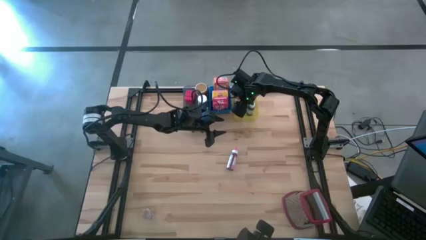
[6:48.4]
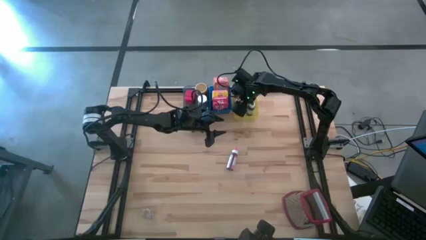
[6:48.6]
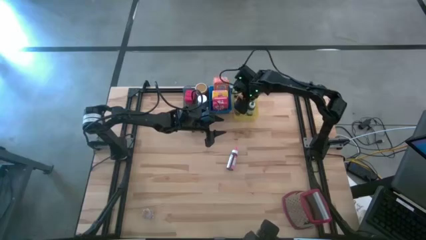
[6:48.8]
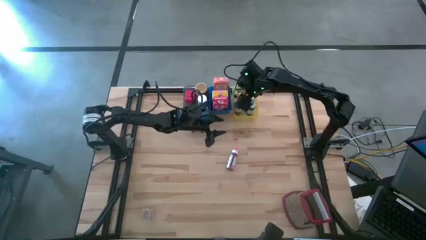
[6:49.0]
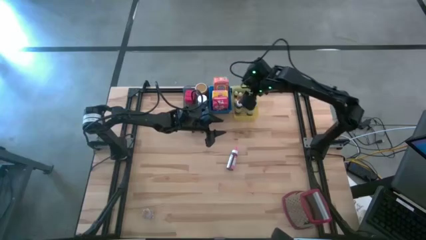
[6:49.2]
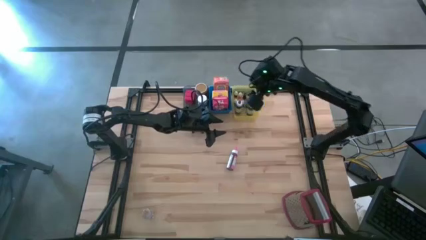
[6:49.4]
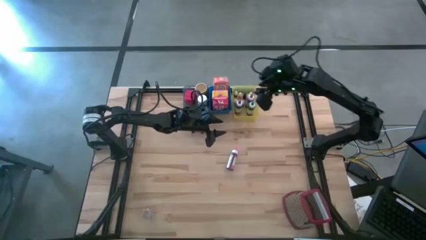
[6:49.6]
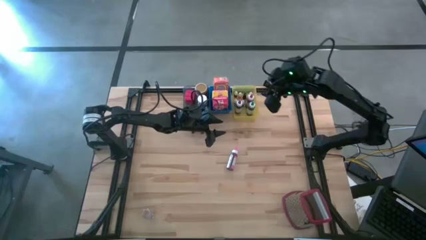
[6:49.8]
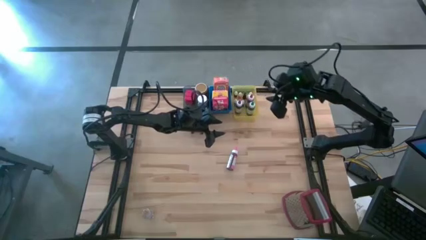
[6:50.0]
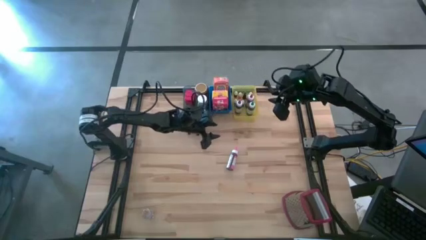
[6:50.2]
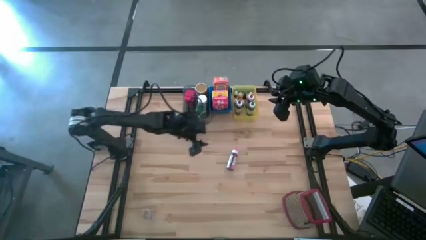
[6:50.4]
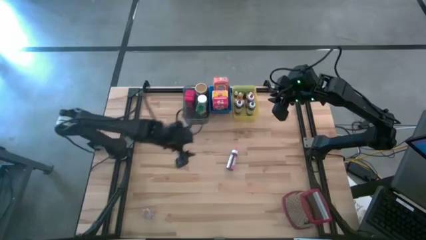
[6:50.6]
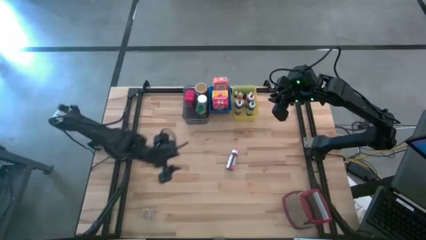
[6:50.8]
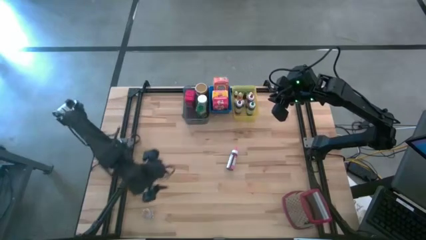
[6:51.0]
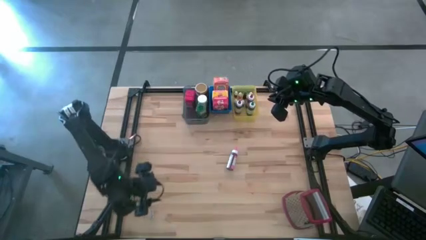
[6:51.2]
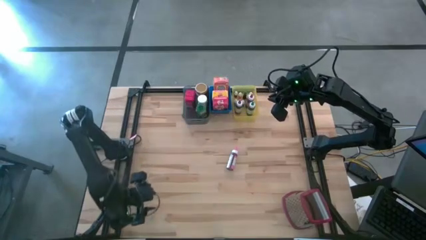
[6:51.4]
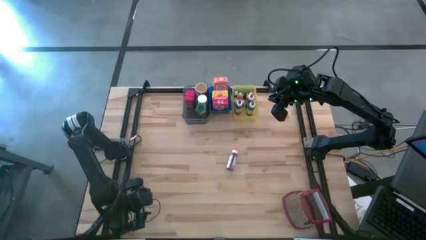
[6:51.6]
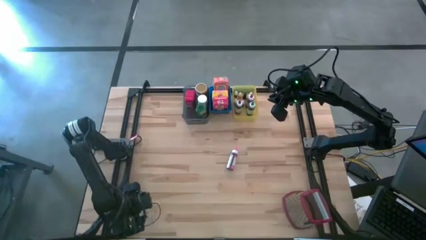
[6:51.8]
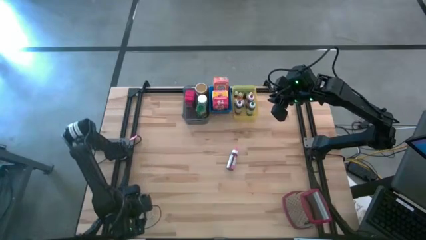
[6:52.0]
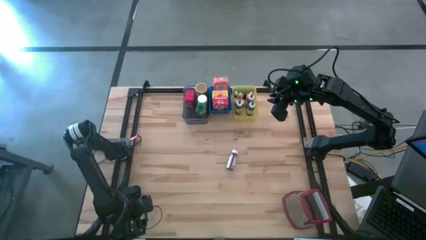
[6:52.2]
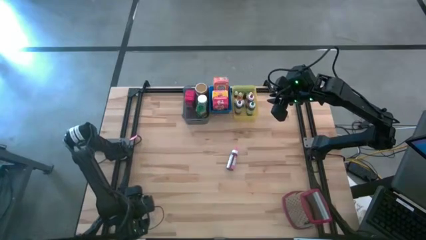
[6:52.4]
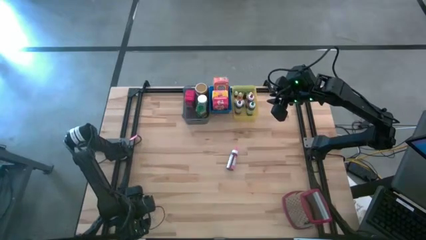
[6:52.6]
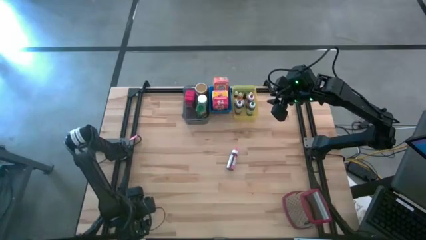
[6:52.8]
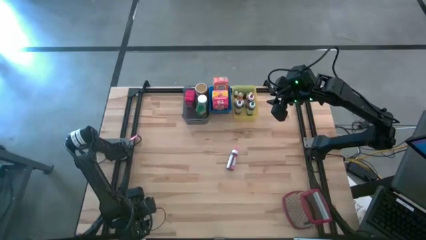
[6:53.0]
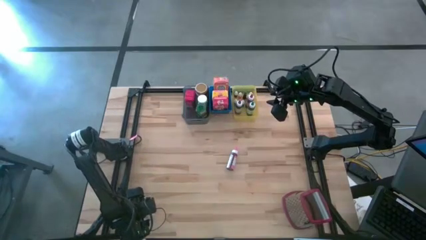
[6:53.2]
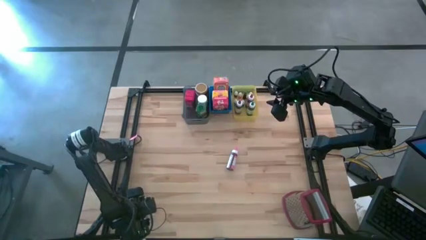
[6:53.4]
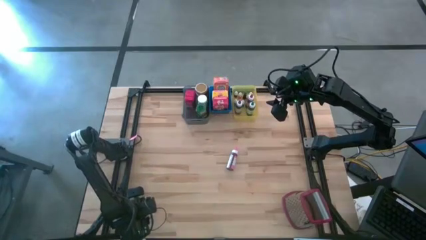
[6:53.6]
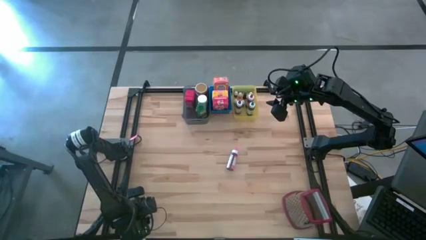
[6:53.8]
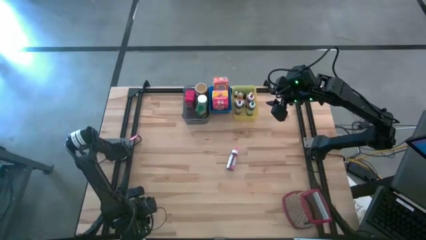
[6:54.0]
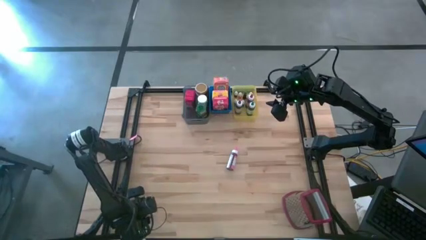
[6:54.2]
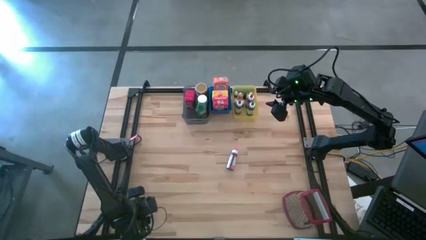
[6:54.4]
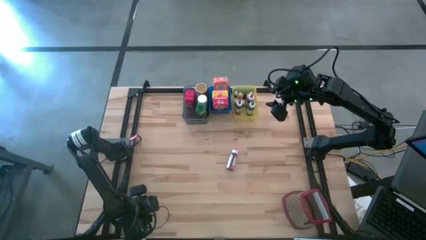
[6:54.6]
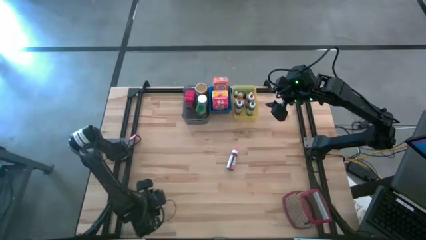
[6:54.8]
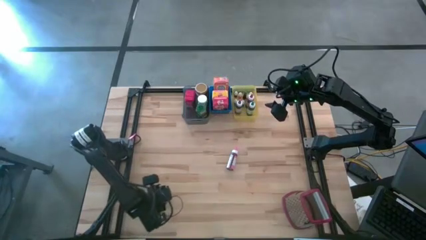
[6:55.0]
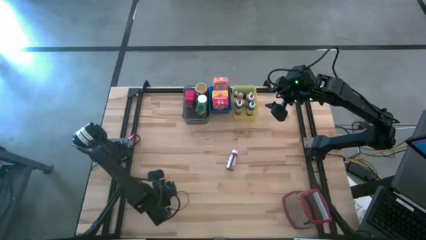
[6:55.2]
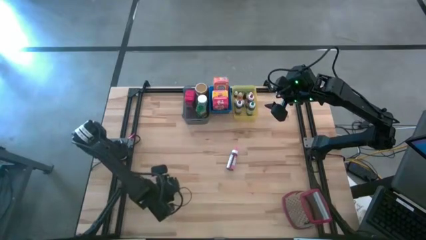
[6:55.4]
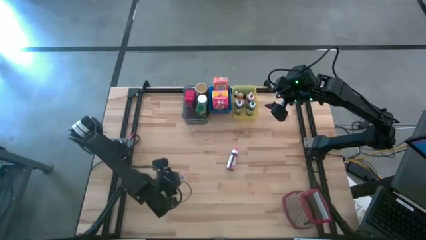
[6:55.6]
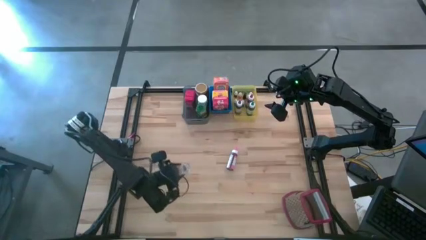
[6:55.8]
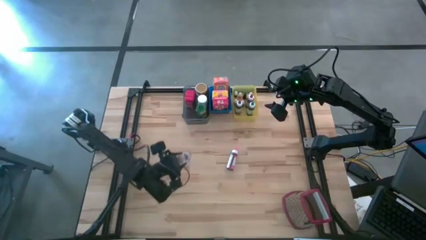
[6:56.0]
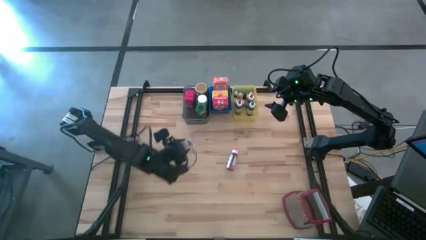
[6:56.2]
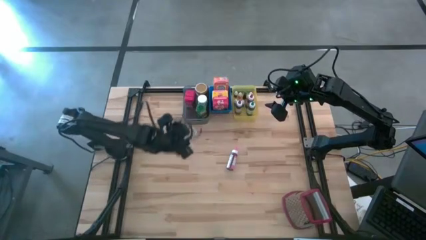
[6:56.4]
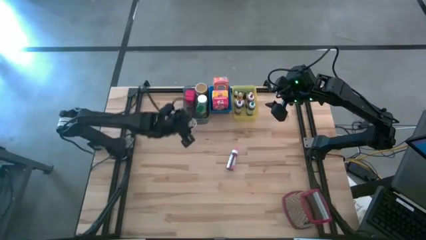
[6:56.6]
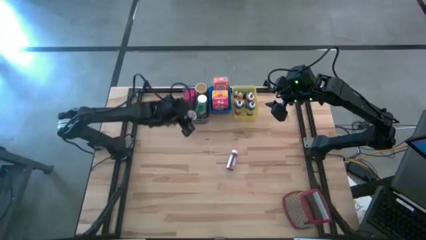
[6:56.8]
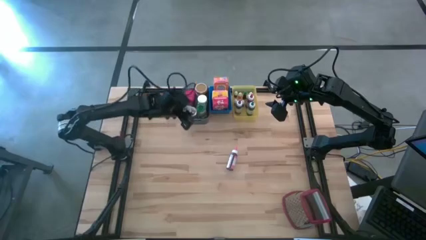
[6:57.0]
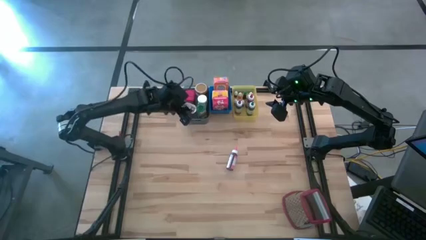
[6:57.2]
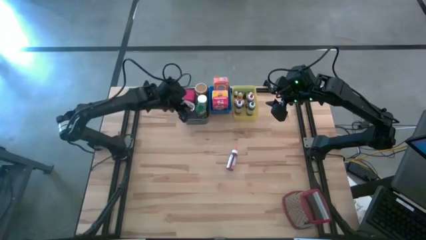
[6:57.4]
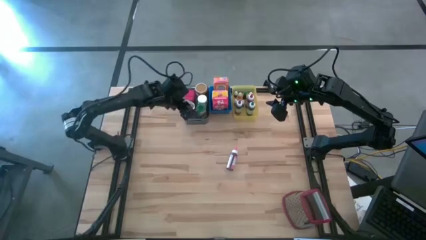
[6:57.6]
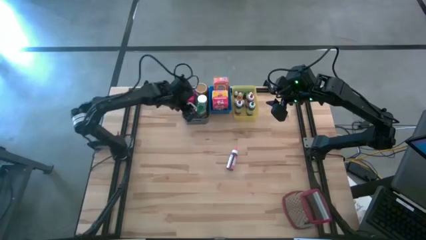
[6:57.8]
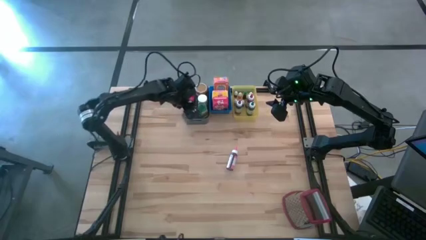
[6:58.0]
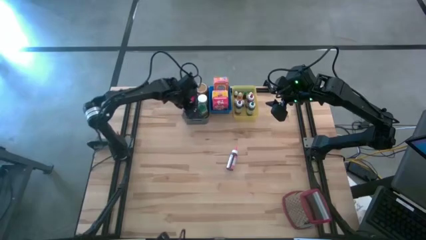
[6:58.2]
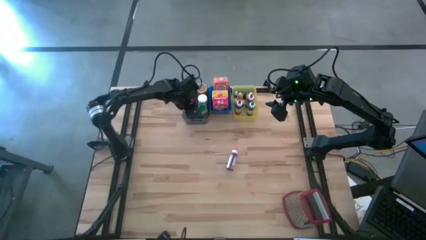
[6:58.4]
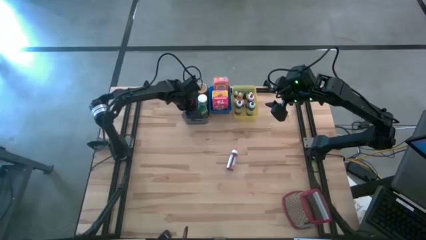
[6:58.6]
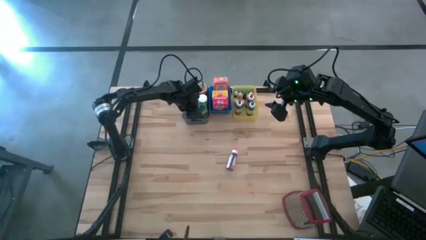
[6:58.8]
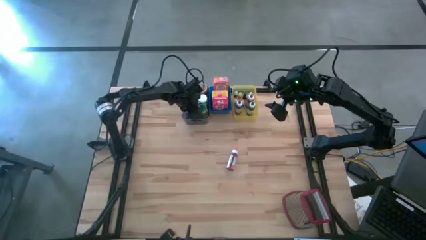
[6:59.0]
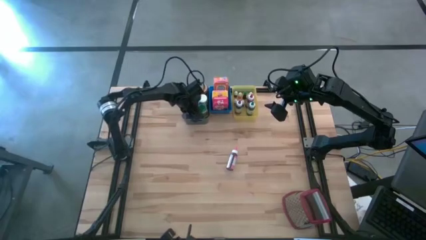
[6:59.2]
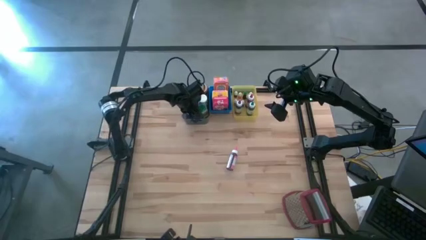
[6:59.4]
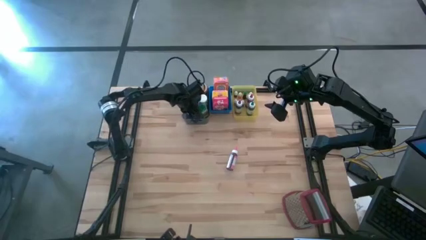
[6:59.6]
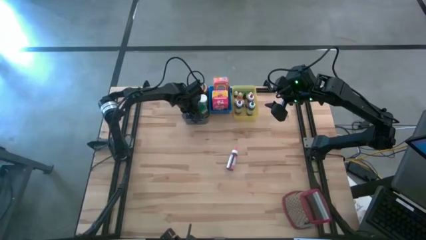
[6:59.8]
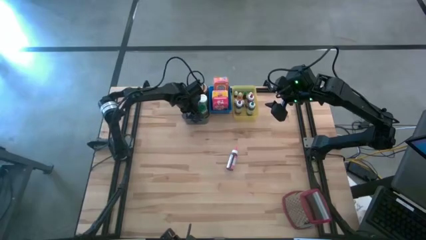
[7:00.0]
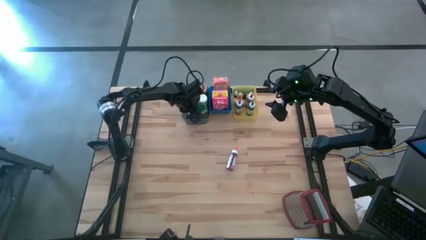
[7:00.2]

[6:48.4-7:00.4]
Task: Pick & Place Kitchen Items
Put the transparent spice bottle into the black bin

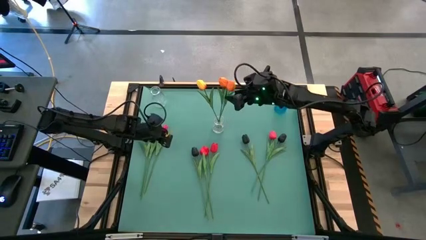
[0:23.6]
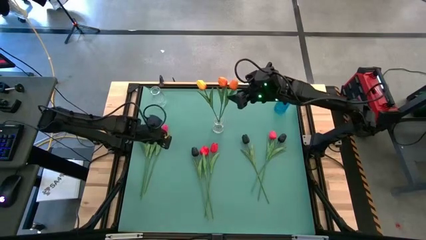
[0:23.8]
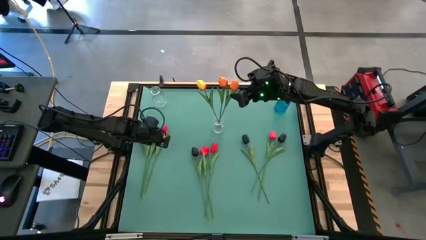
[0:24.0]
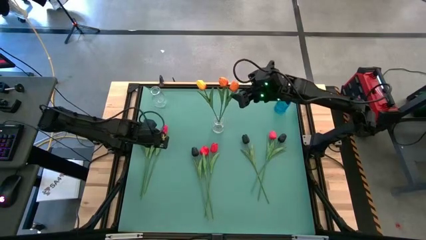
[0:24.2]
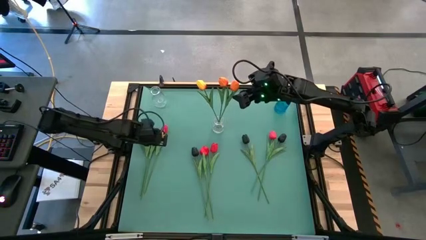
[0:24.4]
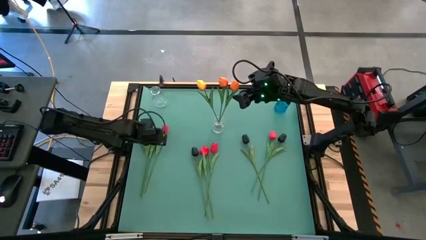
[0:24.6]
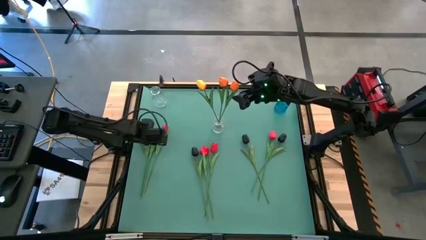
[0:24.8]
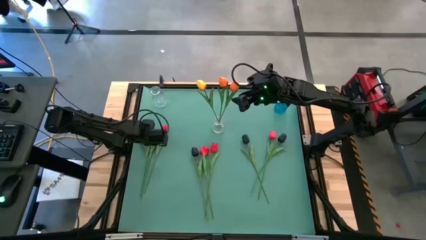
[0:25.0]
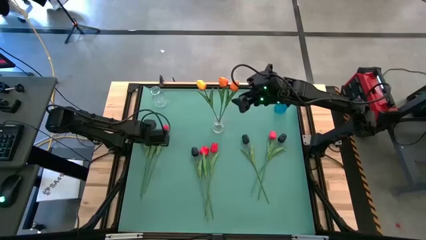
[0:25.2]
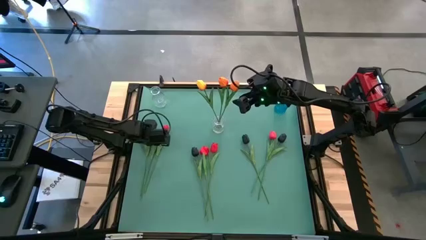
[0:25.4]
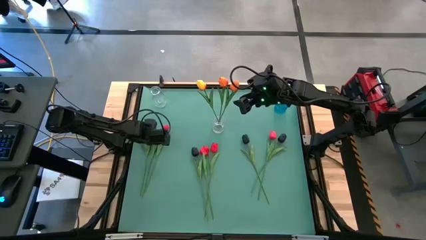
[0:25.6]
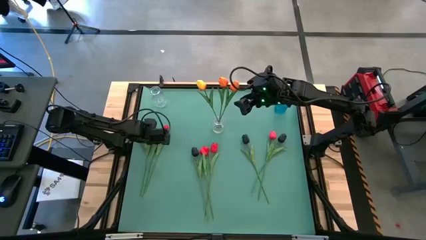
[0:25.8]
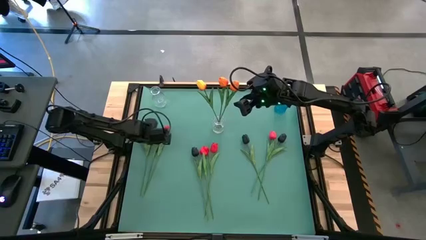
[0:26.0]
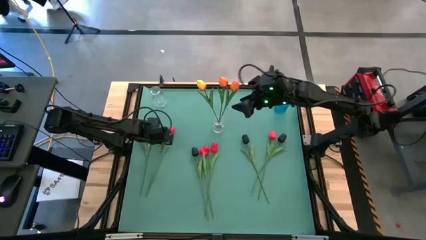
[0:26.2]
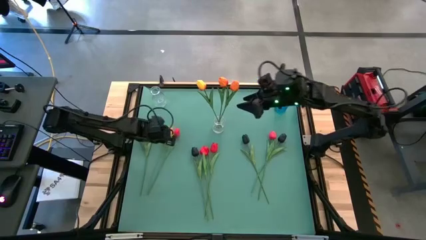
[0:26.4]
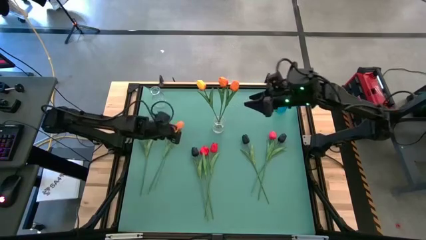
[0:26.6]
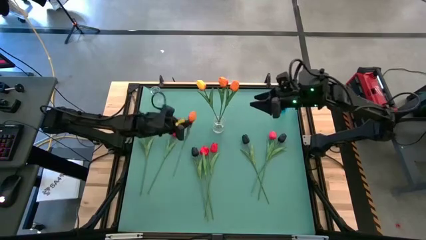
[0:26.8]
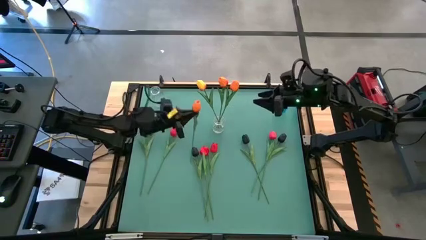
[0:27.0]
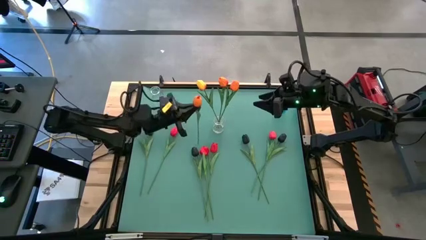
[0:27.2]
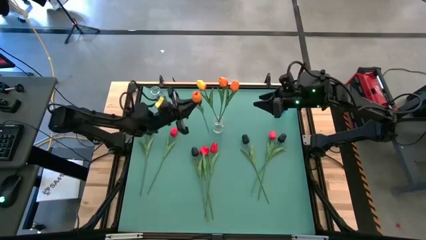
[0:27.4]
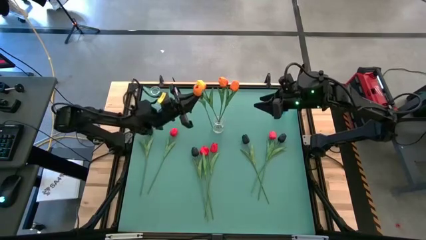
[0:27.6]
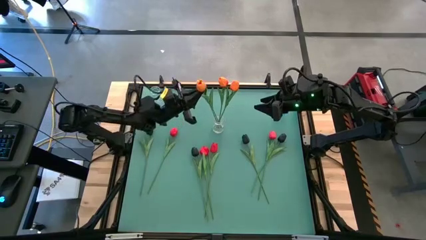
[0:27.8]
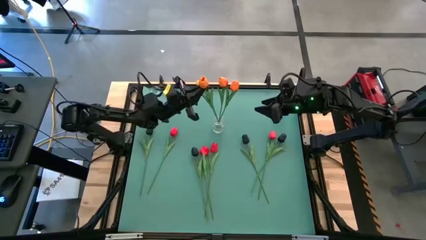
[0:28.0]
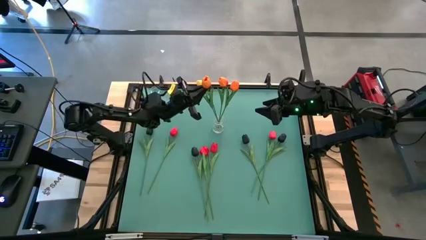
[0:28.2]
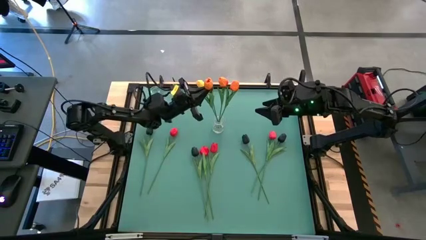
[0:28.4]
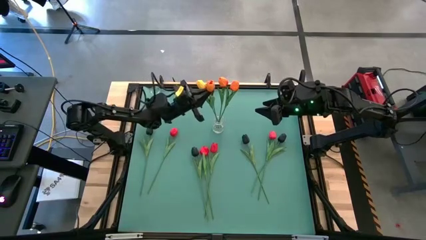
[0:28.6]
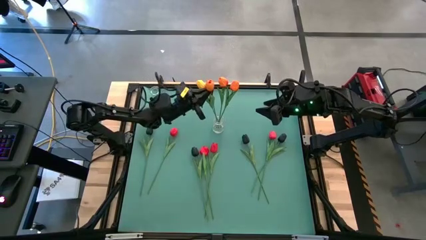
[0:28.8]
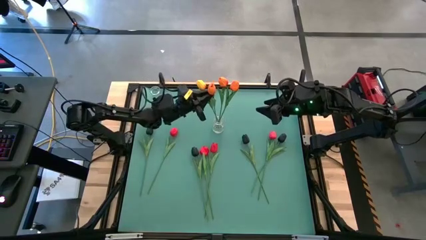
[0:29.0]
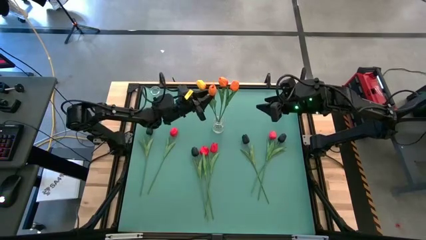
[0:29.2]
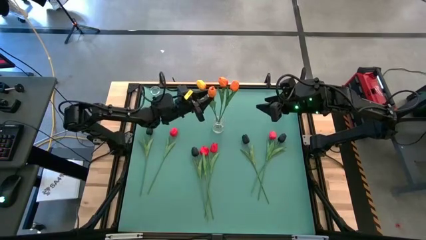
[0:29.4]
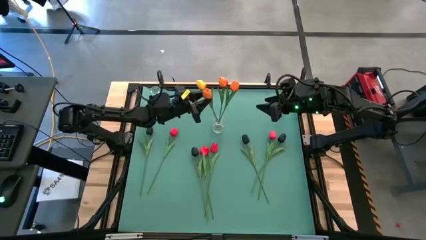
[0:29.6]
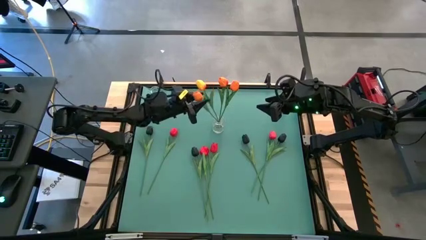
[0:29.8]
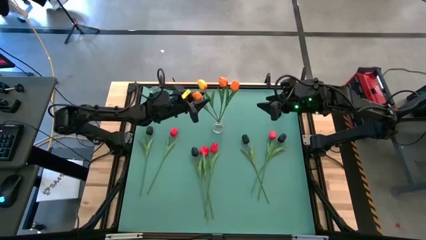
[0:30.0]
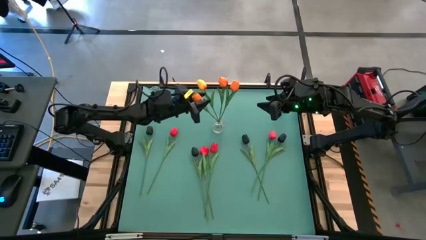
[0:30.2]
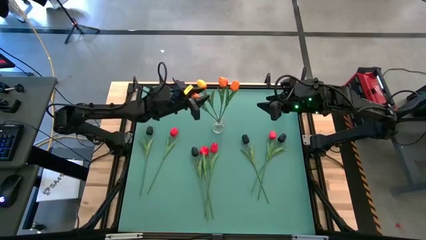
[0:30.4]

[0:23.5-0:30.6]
Task: Sort flowers into vase by color
Put the orange tulip into the right transparent vase
